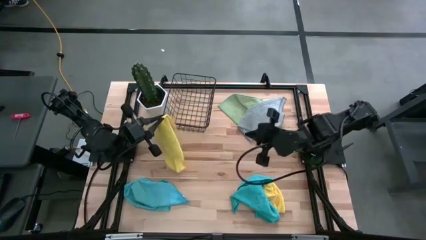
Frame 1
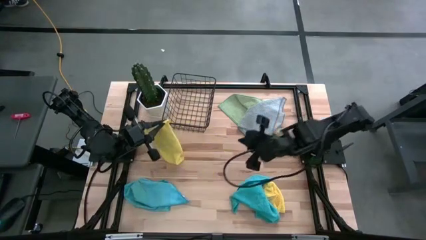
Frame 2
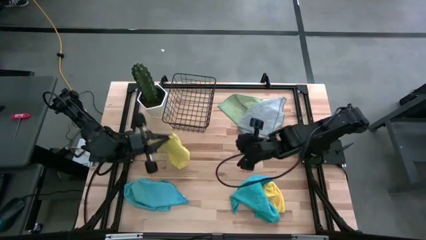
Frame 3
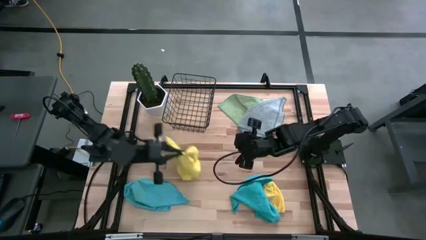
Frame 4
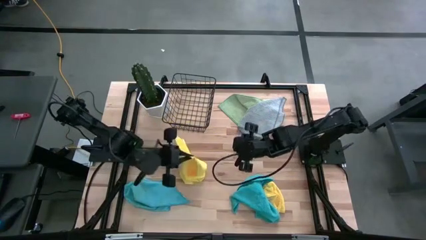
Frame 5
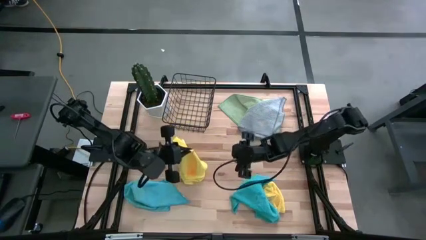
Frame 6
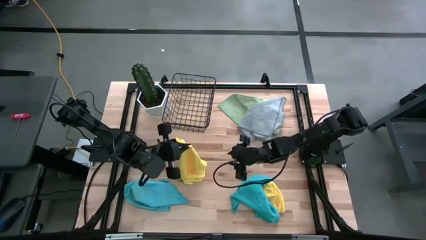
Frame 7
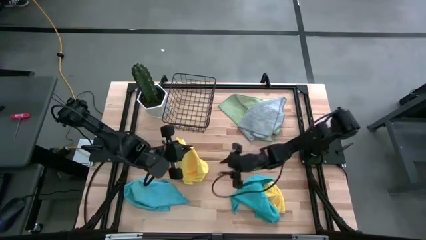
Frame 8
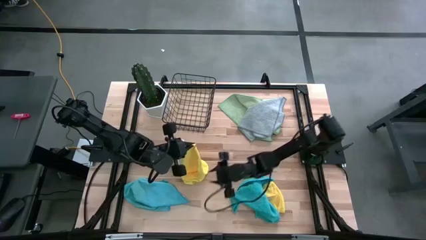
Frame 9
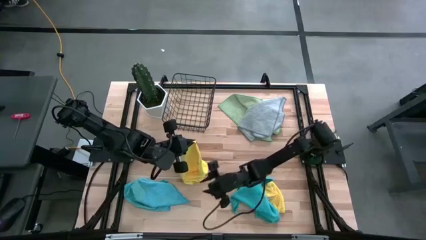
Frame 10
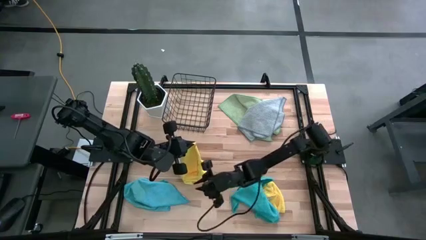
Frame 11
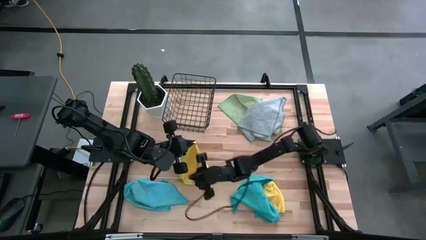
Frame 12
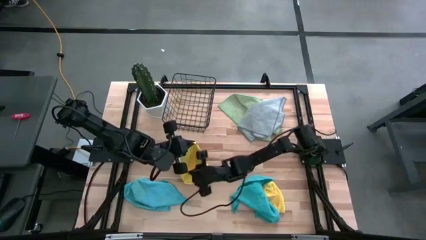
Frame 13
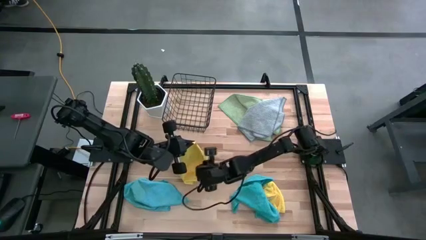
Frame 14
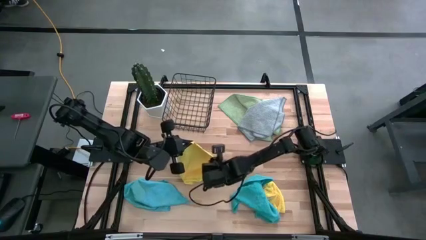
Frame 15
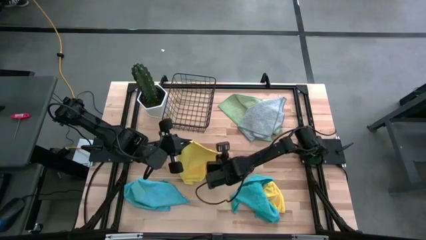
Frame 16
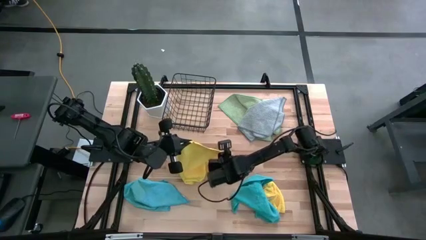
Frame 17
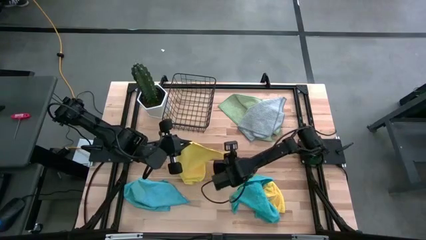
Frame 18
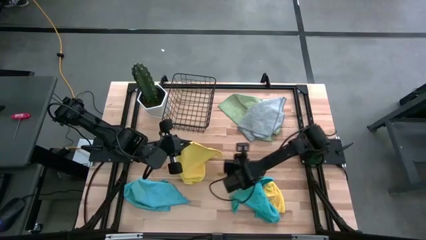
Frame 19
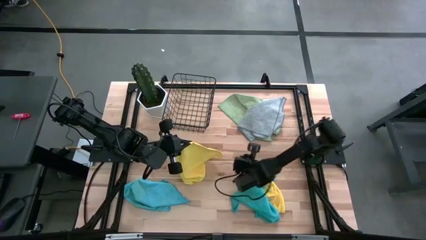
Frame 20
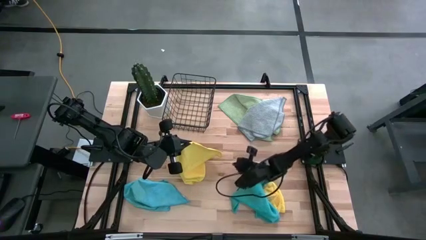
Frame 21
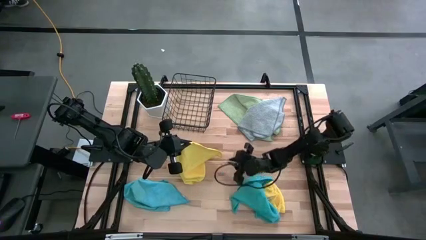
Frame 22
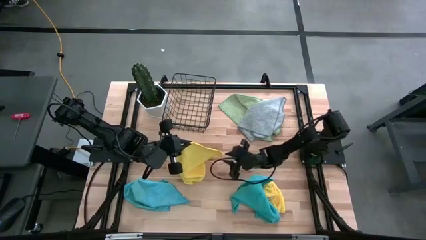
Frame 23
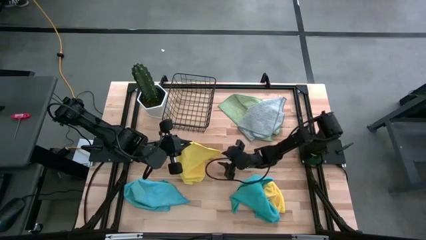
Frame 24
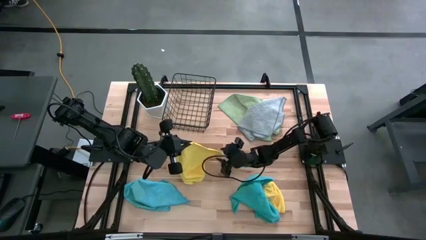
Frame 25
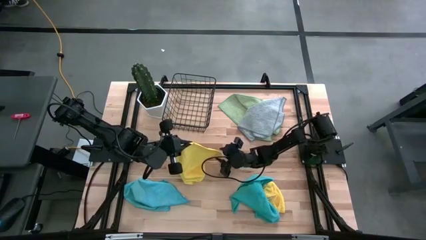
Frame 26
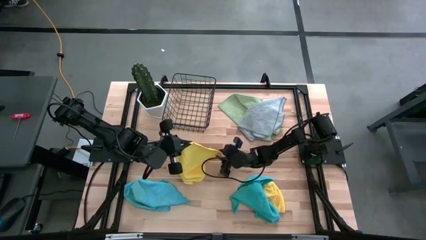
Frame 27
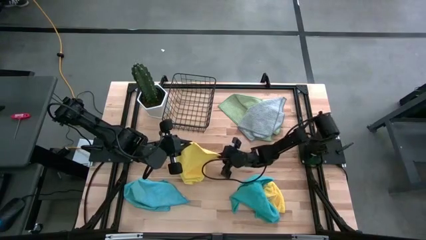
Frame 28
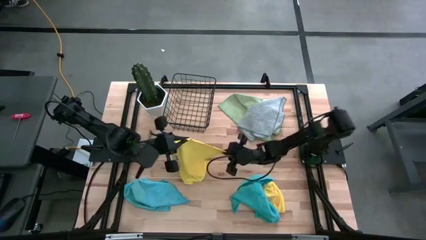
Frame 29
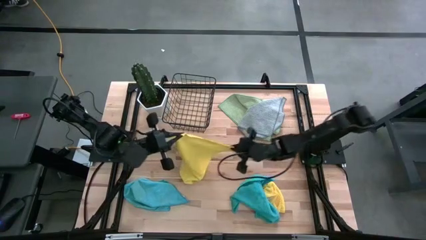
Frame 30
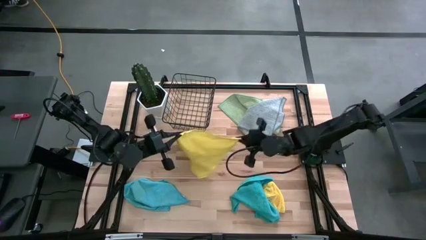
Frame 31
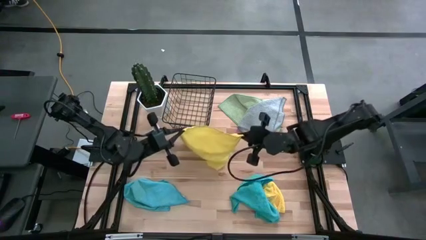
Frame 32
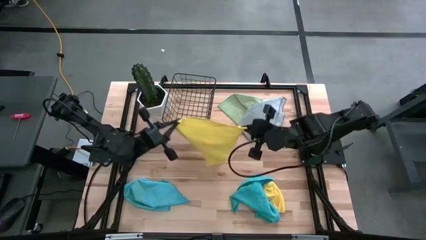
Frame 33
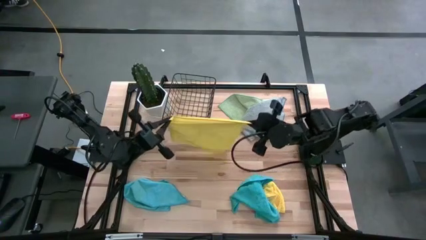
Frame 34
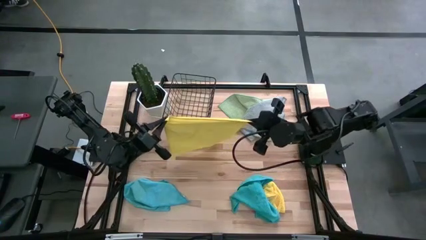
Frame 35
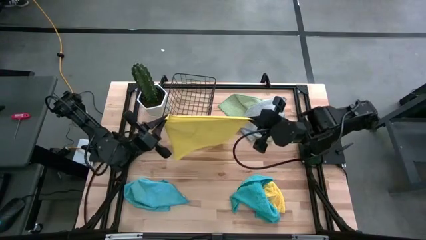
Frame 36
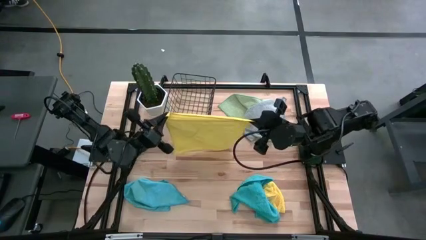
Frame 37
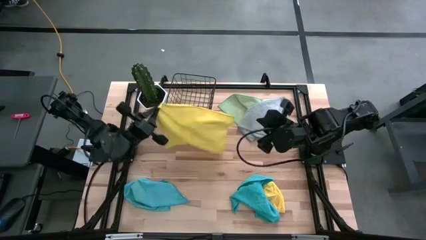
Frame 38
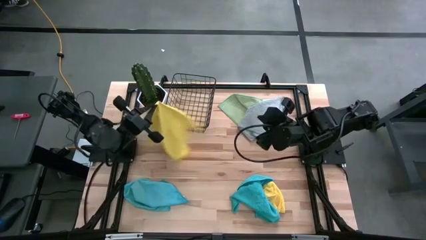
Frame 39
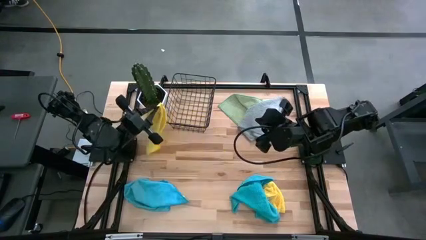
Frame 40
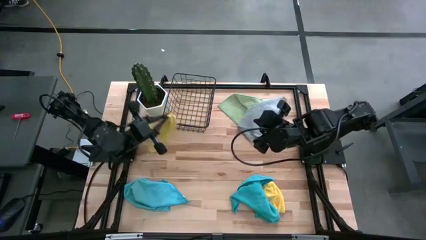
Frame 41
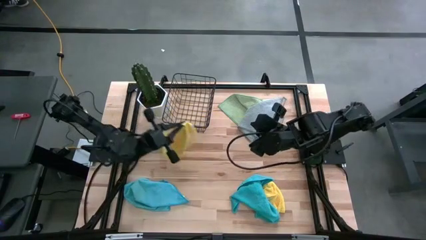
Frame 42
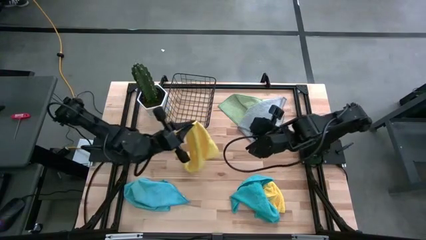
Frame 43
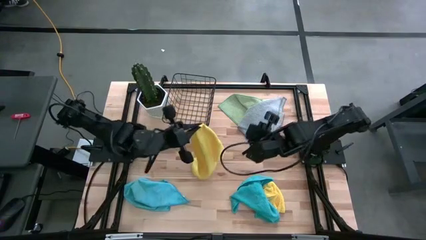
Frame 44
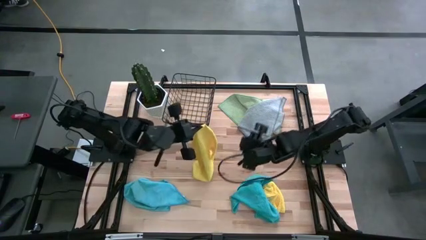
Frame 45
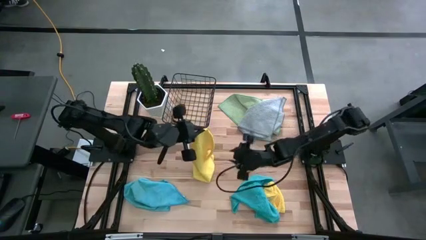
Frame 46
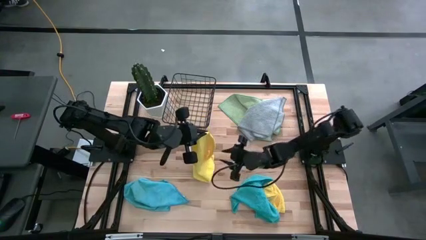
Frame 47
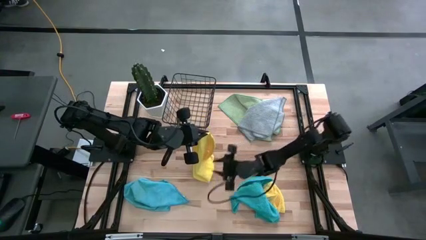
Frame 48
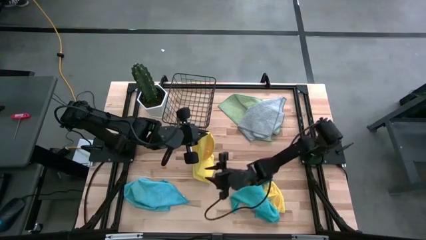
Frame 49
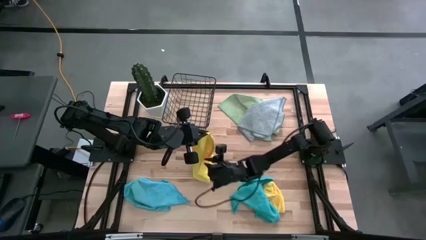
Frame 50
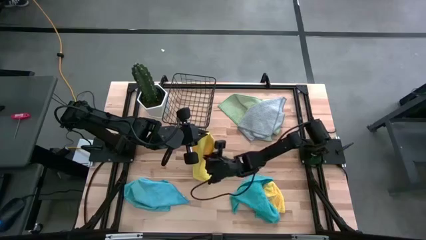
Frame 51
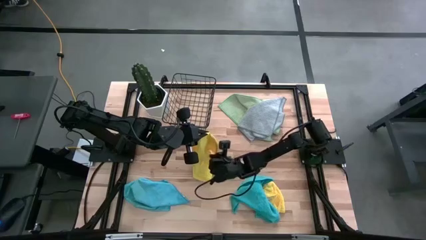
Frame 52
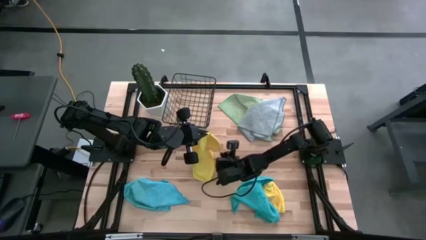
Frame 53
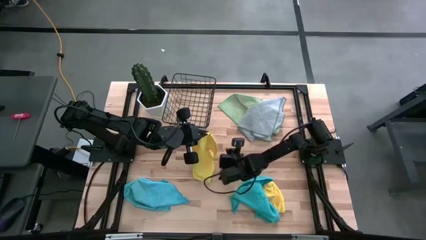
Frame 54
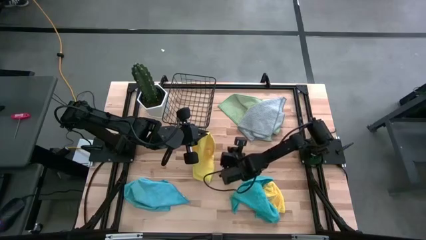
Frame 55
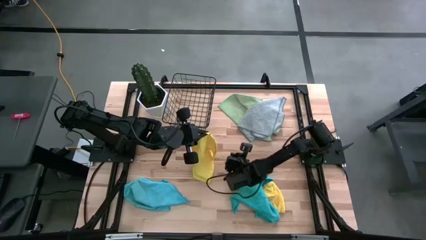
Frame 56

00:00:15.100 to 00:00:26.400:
Task: Fold microfiber towels
Fold the left yellow microfiber cloth

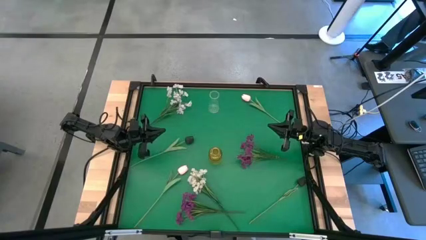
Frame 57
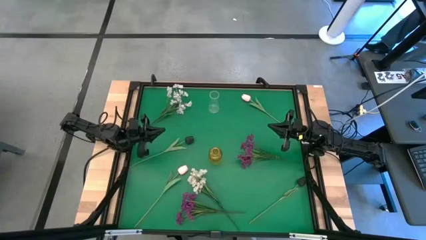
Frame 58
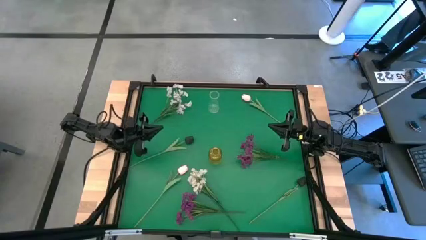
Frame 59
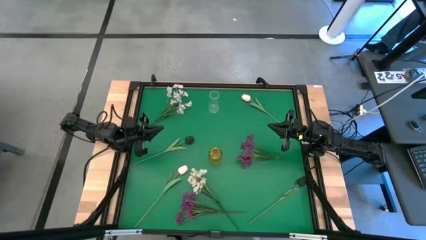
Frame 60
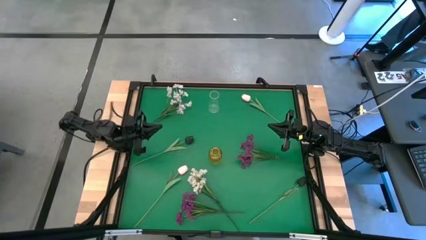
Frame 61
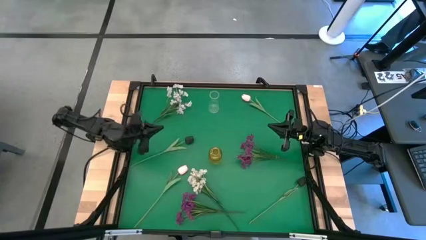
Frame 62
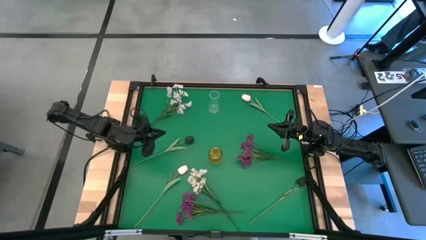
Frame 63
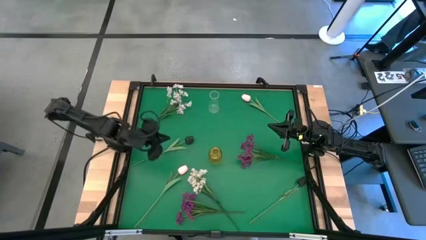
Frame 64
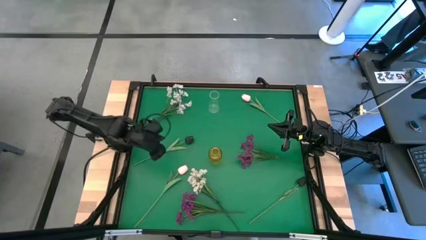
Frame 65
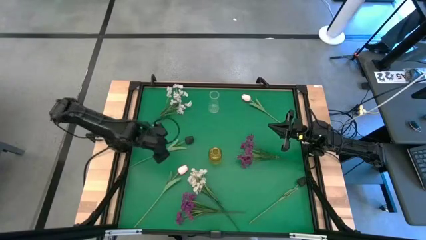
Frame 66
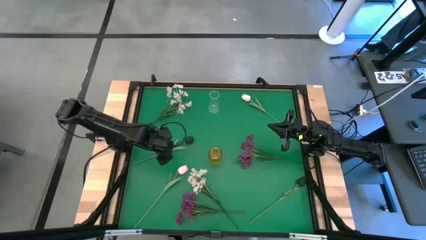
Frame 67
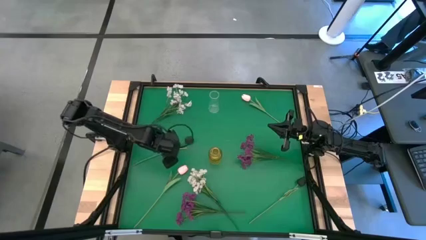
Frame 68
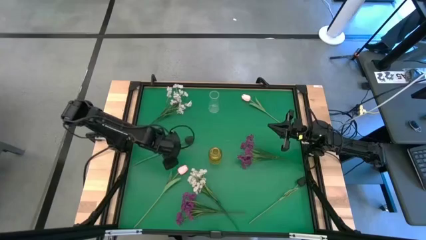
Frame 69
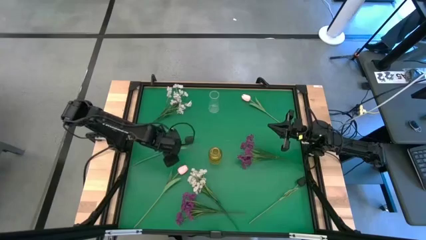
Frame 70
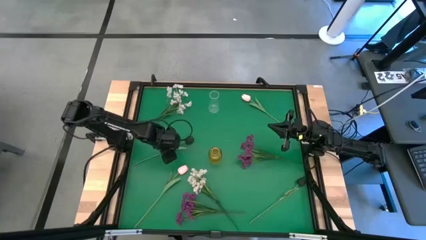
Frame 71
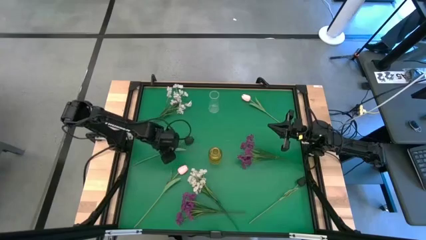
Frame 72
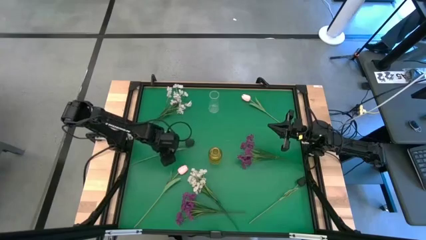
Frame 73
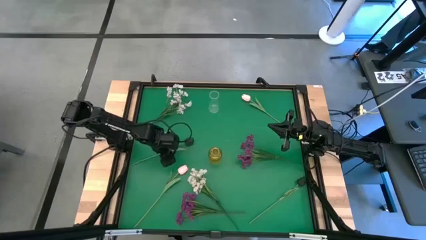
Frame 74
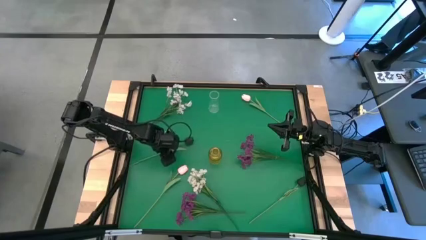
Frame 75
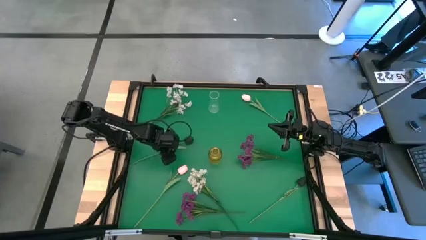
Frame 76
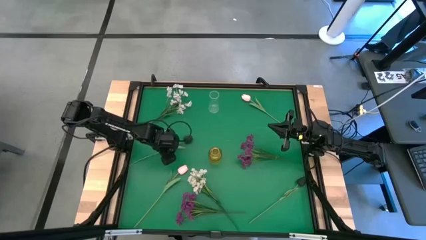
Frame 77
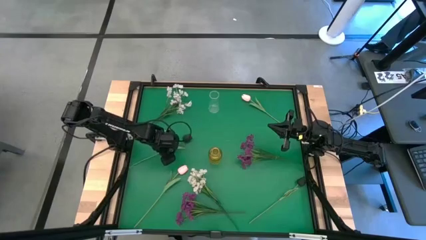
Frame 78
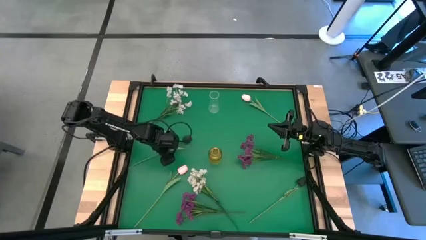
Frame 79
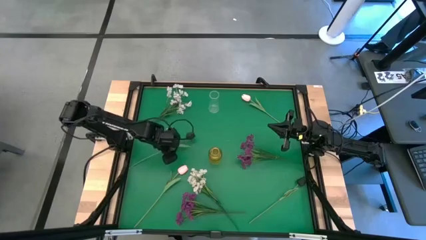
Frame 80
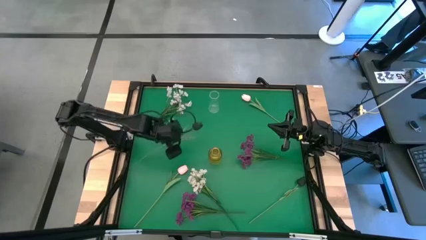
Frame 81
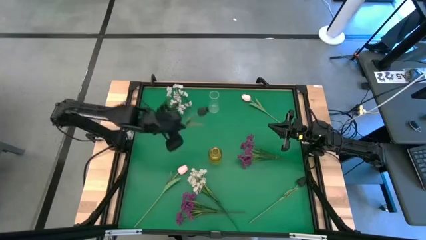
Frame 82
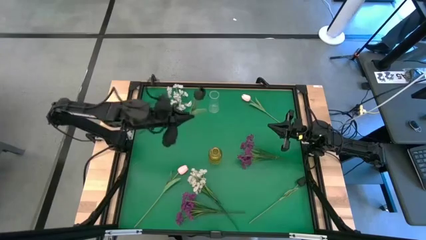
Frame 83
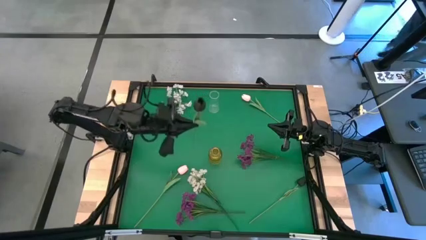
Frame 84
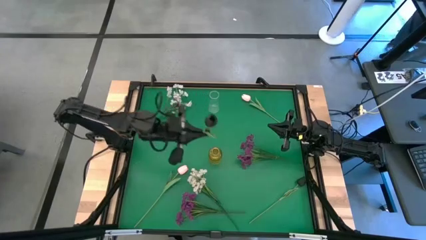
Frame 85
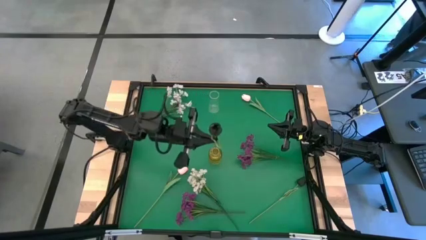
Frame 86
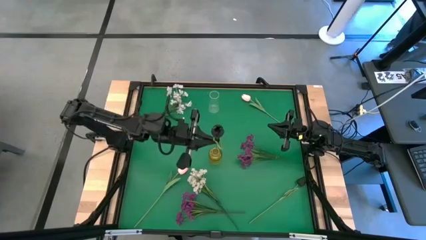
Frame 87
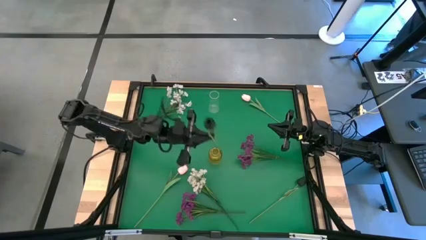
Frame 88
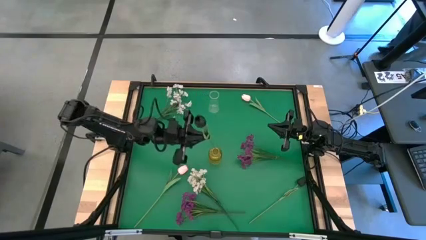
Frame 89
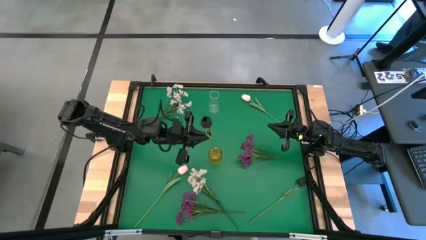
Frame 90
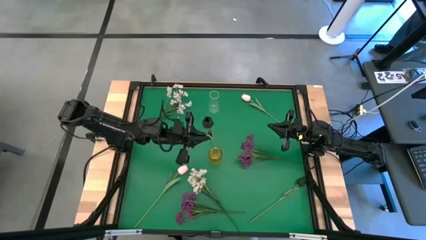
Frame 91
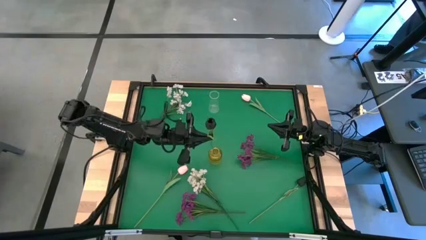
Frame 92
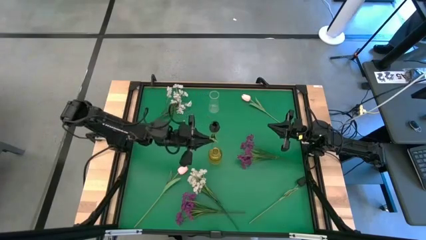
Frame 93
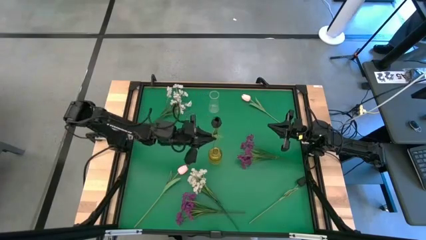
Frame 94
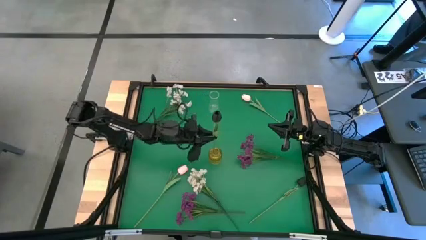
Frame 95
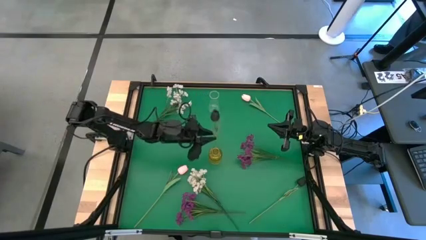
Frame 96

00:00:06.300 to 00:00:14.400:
Task: Sort flowers into vase by color
Put the left black flower into the yellow transparent vase
